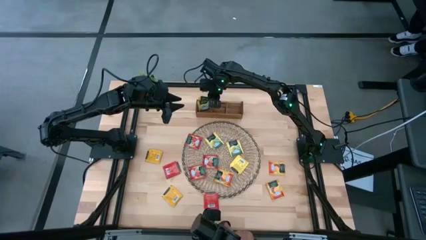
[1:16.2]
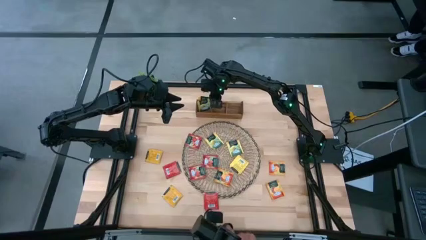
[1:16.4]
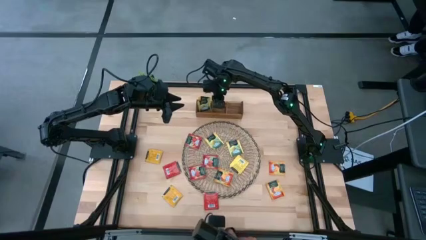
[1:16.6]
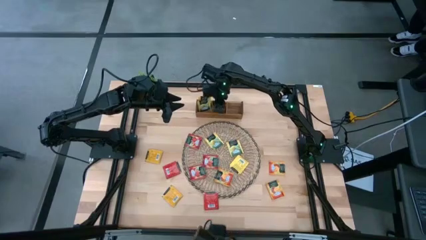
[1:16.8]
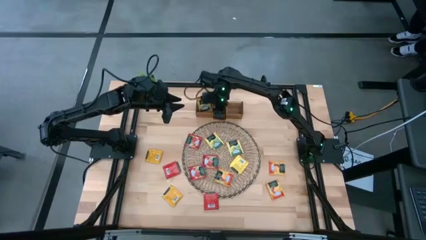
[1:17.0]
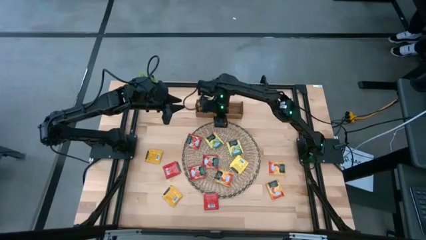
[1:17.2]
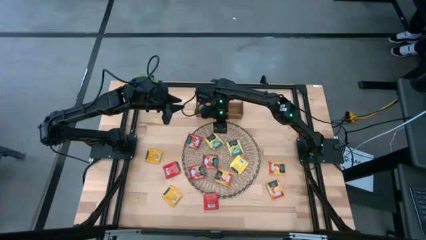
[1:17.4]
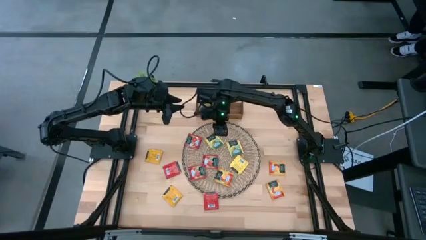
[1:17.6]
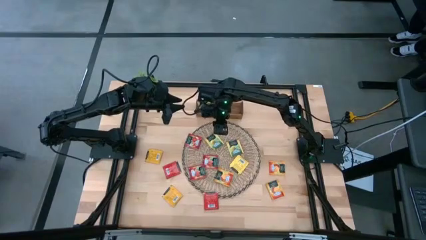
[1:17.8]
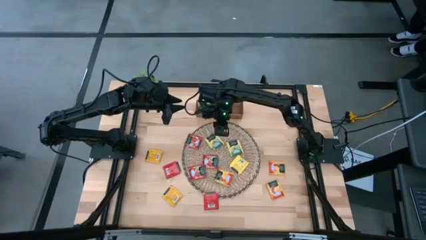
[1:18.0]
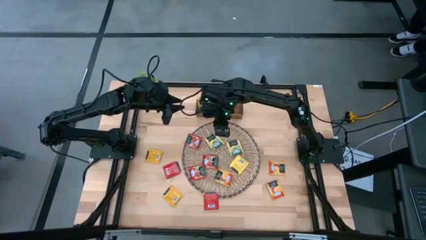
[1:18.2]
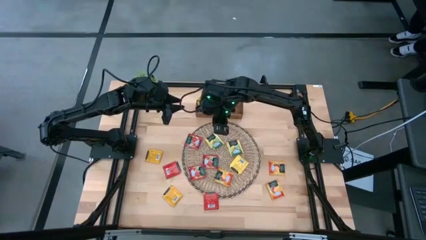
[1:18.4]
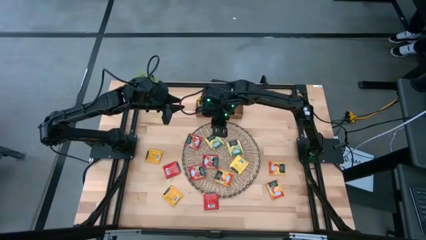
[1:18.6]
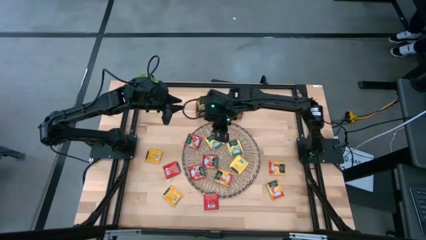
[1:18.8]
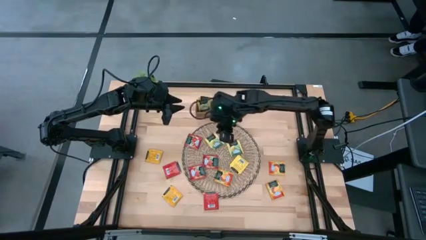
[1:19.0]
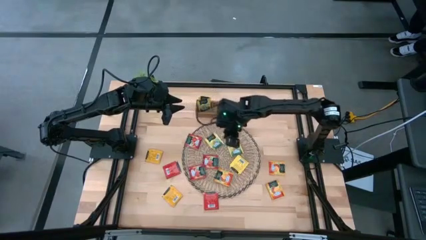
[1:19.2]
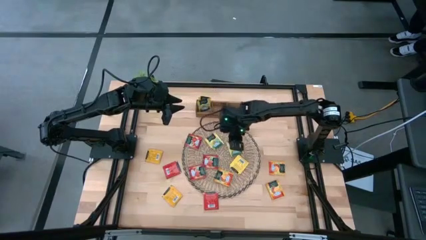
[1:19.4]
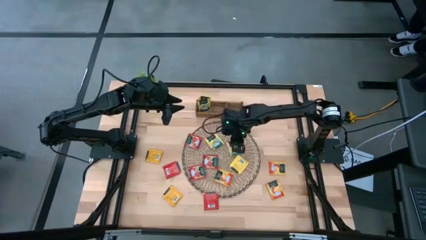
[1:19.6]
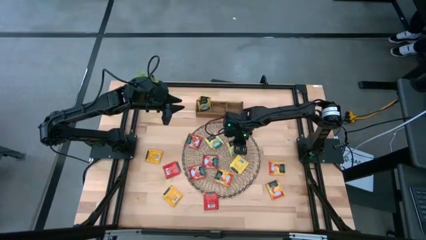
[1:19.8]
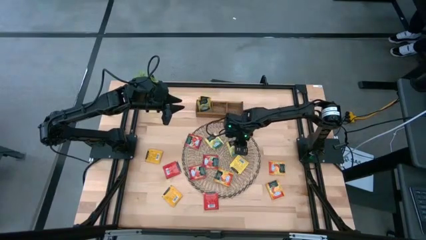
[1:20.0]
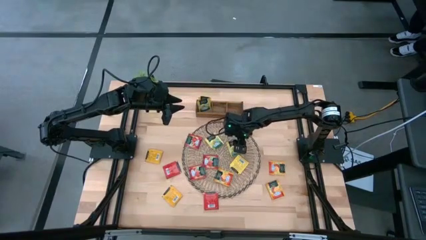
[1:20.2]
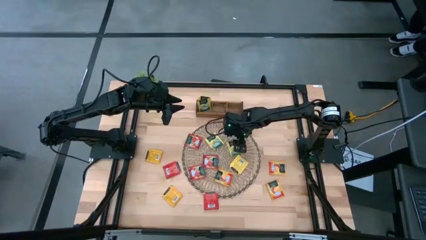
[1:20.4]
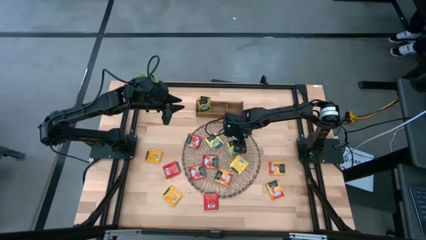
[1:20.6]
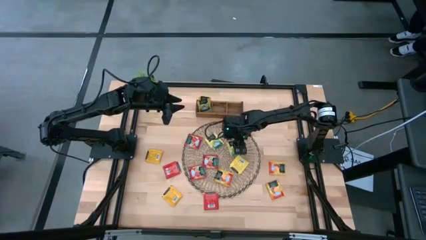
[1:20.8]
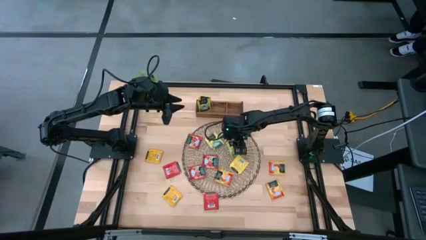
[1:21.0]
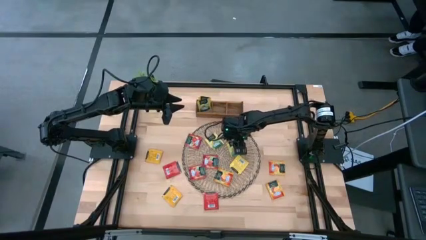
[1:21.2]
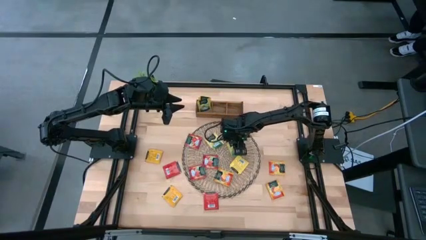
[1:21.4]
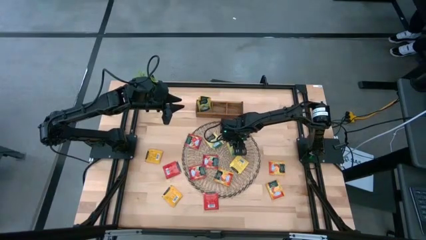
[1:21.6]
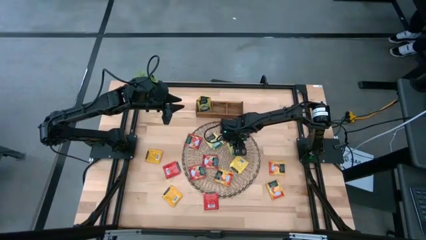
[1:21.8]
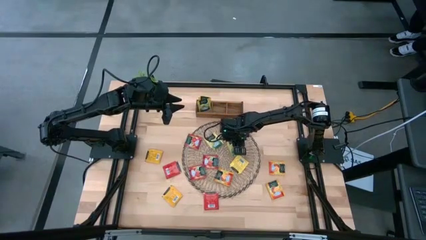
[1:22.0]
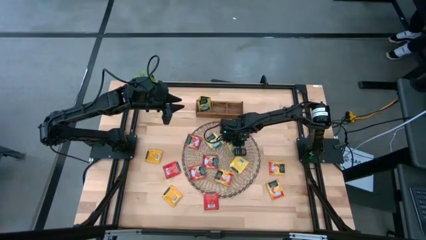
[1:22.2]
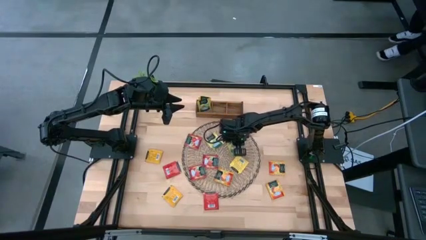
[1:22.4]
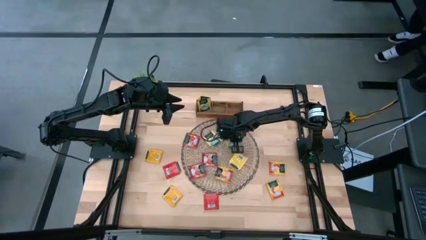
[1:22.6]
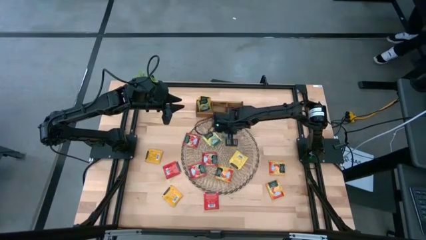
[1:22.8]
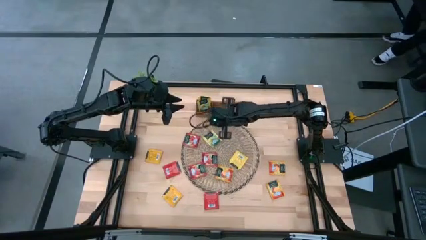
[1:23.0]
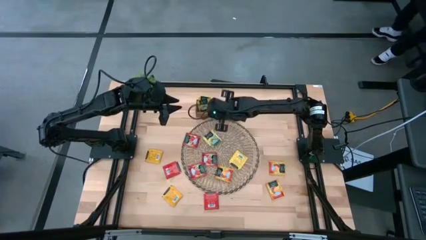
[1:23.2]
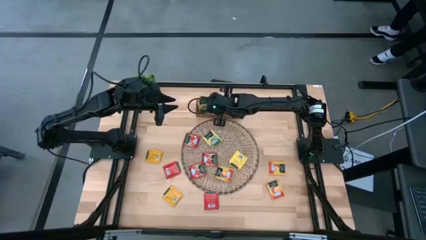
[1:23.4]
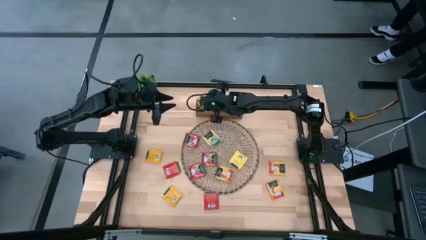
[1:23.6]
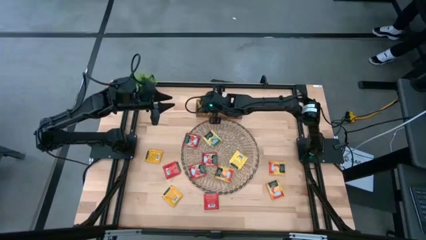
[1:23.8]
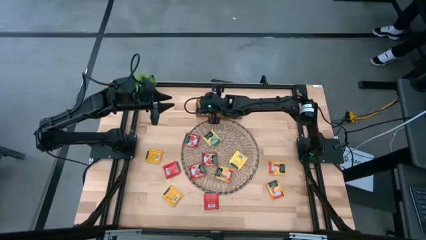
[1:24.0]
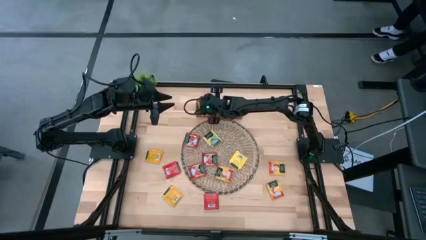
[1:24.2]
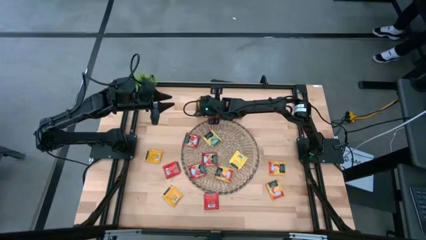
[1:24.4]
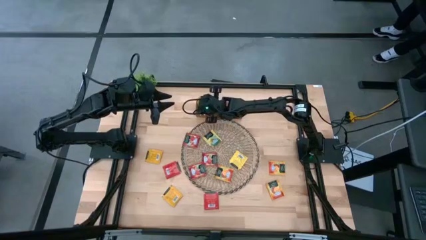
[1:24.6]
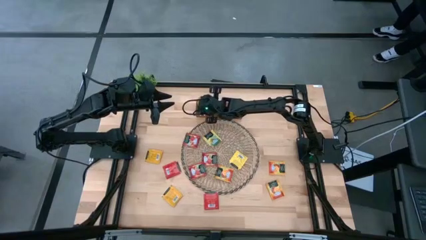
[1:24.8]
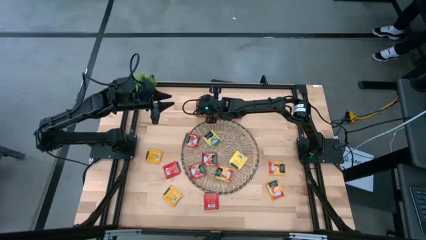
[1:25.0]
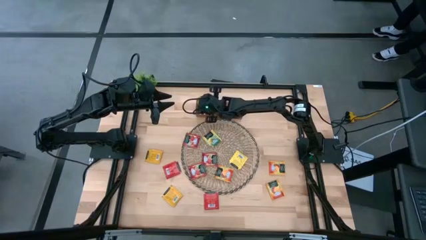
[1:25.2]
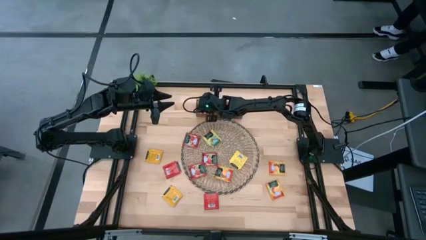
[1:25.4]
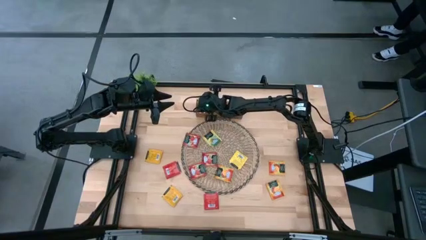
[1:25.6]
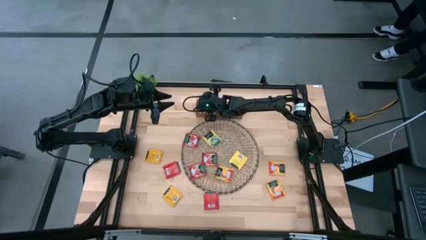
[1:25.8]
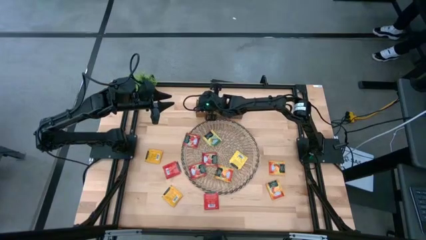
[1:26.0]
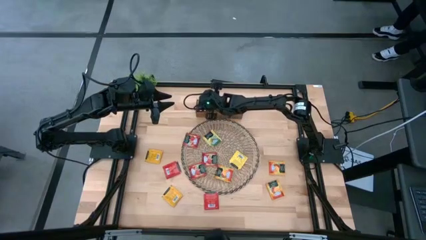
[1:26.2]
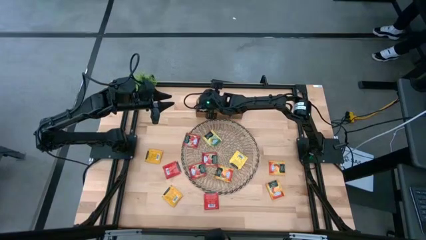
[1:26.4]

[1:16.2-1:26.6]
Task: Pick & Place Tea
Put the middle yellow tea bag into the left of the wooden organizer
